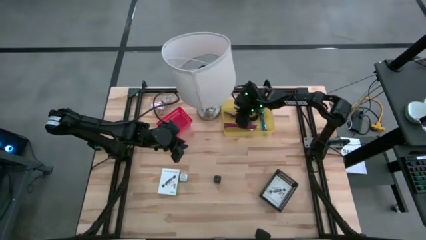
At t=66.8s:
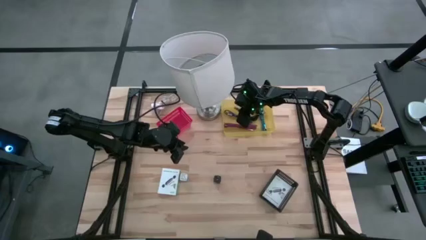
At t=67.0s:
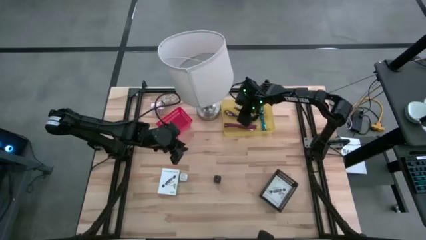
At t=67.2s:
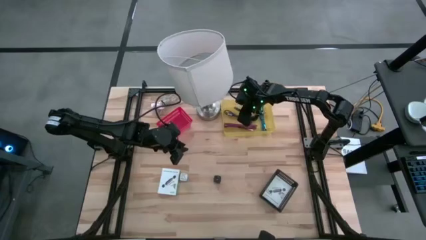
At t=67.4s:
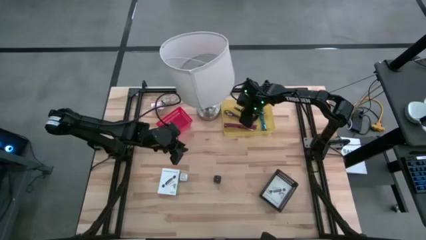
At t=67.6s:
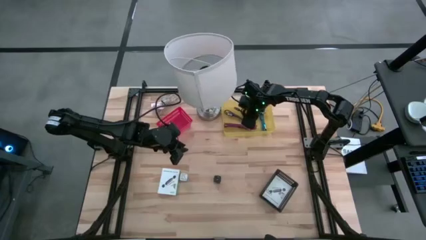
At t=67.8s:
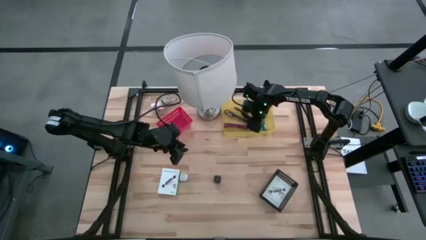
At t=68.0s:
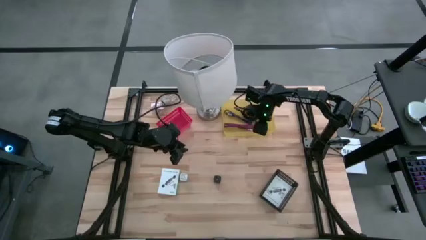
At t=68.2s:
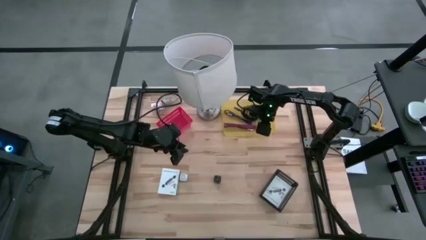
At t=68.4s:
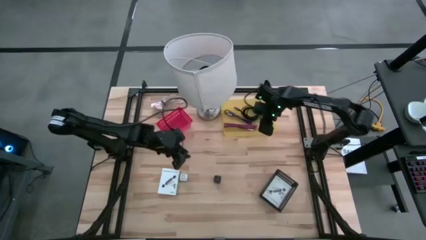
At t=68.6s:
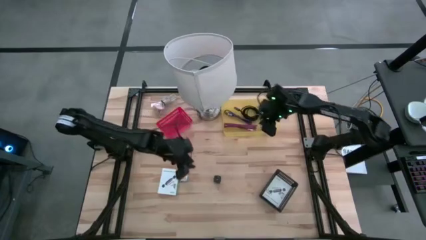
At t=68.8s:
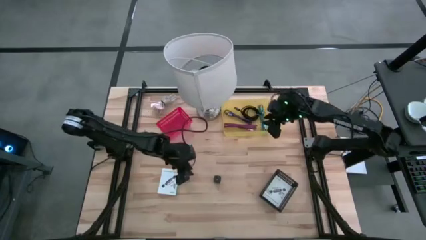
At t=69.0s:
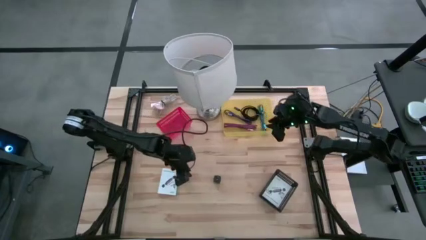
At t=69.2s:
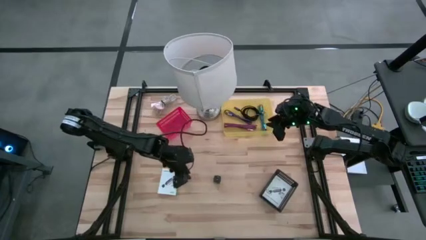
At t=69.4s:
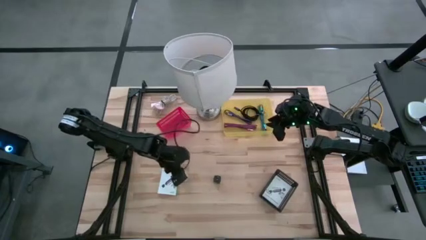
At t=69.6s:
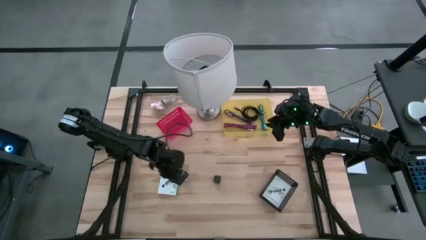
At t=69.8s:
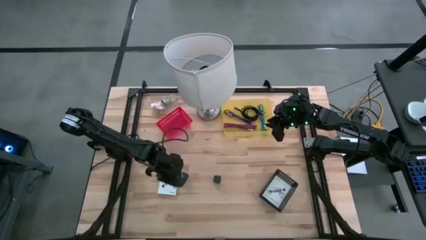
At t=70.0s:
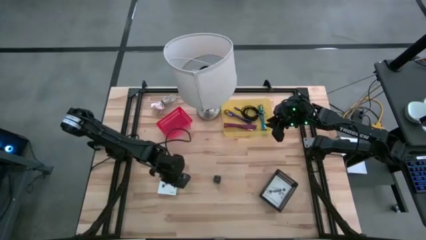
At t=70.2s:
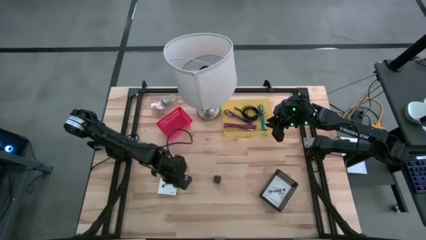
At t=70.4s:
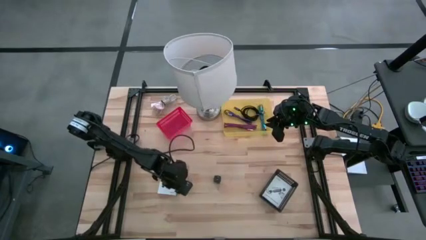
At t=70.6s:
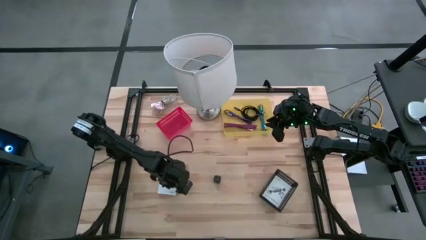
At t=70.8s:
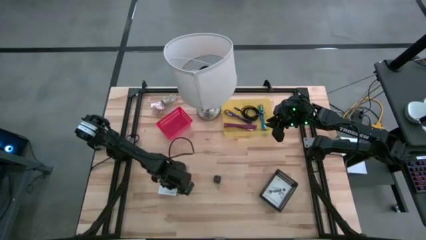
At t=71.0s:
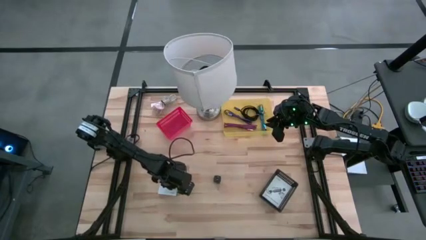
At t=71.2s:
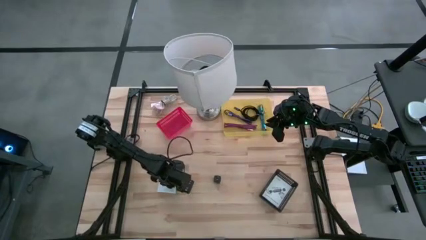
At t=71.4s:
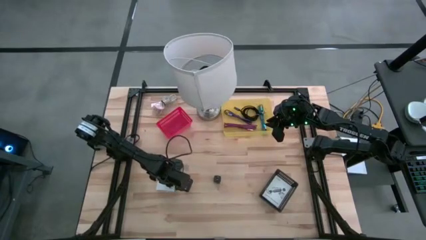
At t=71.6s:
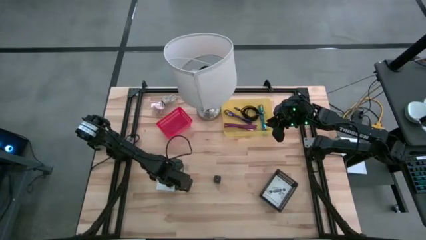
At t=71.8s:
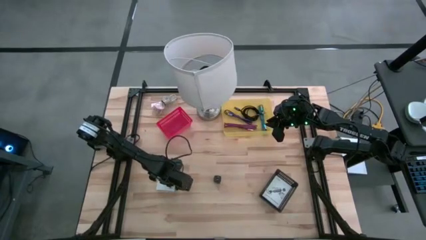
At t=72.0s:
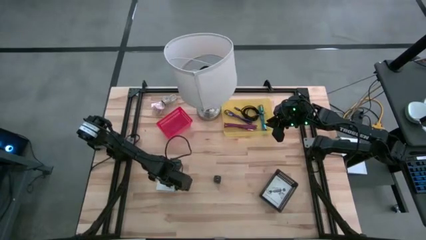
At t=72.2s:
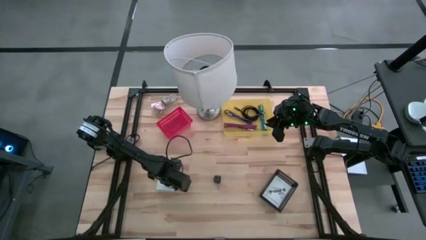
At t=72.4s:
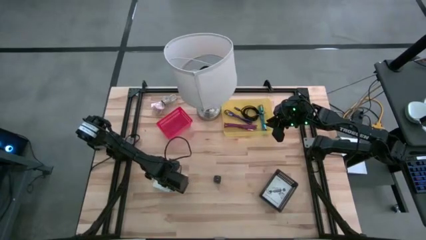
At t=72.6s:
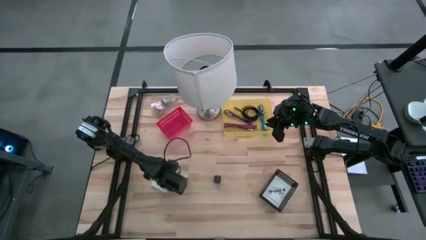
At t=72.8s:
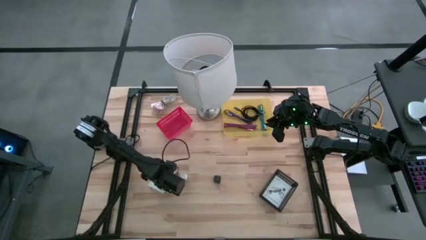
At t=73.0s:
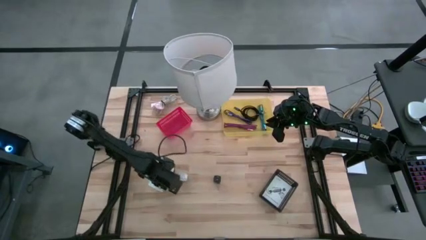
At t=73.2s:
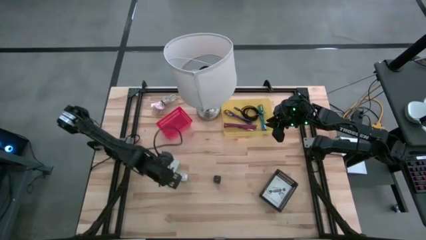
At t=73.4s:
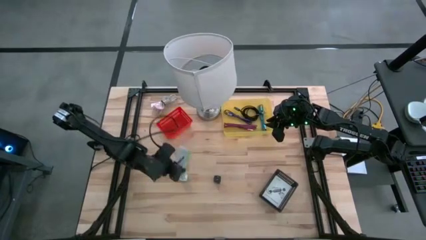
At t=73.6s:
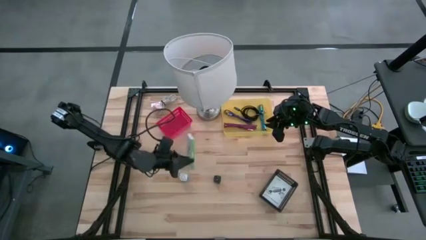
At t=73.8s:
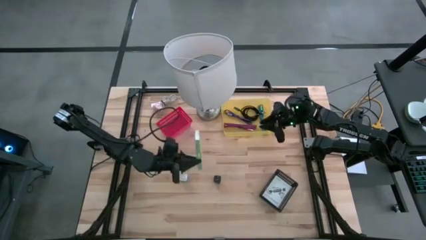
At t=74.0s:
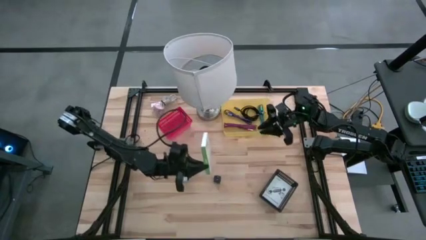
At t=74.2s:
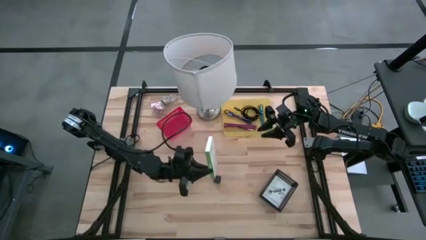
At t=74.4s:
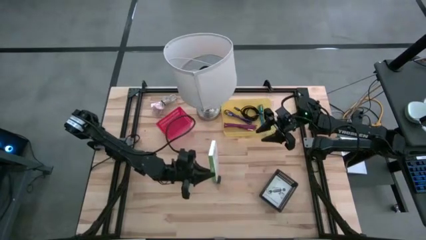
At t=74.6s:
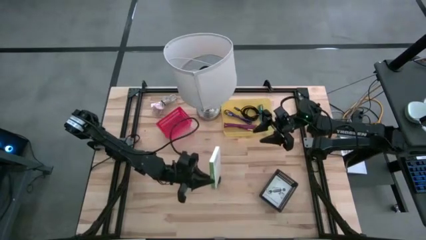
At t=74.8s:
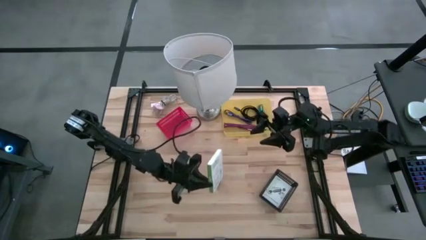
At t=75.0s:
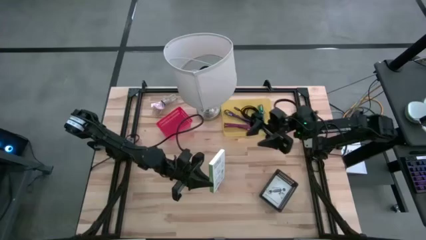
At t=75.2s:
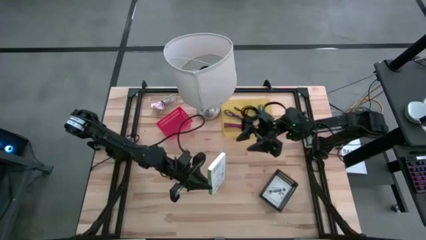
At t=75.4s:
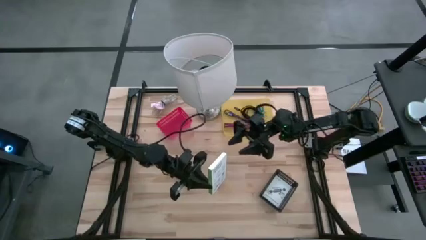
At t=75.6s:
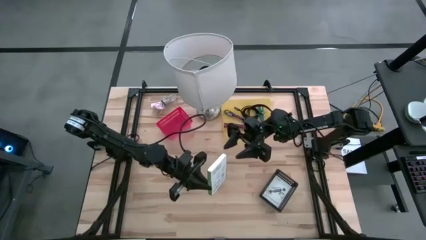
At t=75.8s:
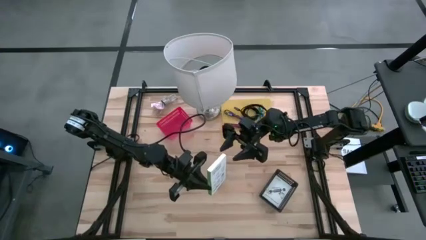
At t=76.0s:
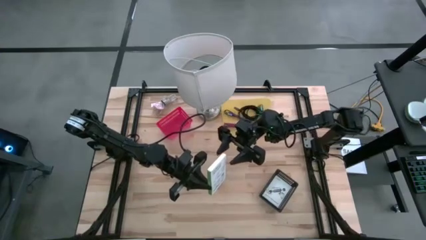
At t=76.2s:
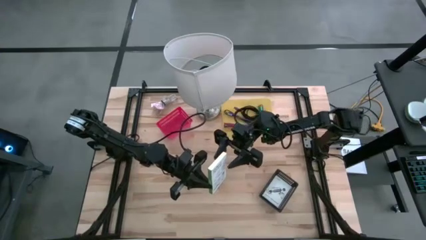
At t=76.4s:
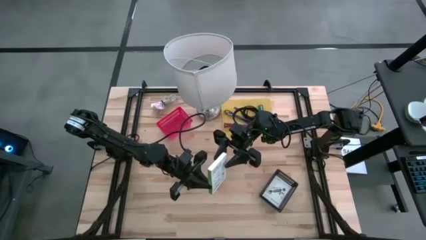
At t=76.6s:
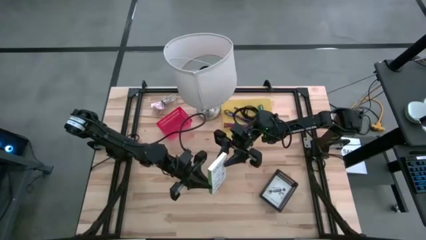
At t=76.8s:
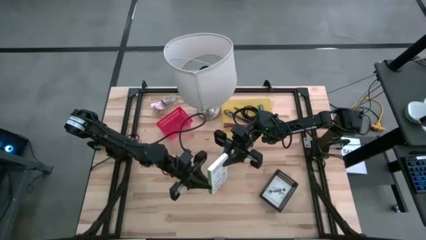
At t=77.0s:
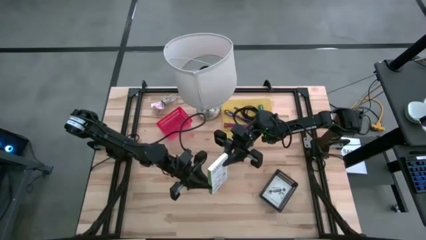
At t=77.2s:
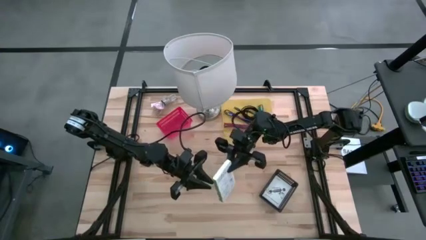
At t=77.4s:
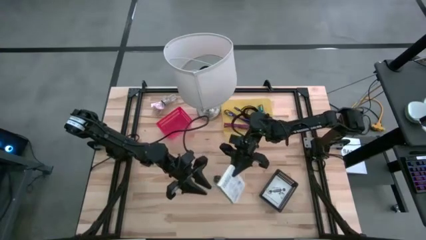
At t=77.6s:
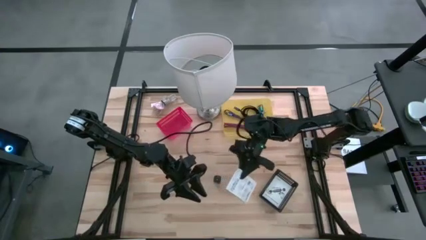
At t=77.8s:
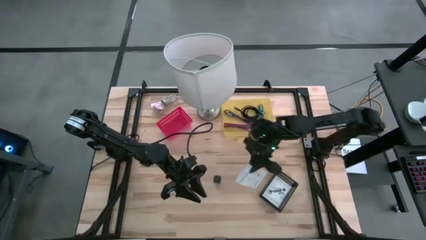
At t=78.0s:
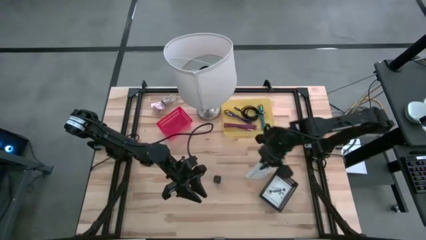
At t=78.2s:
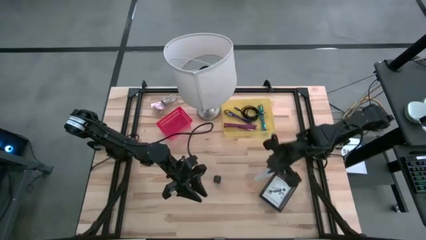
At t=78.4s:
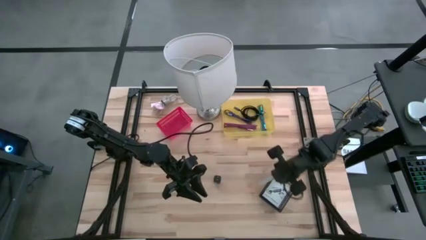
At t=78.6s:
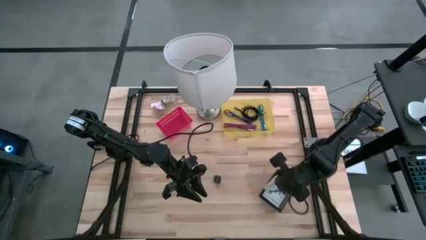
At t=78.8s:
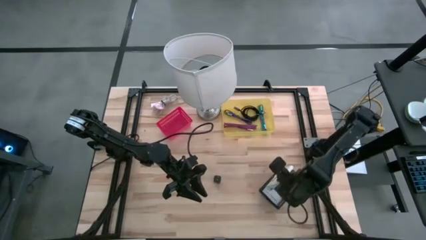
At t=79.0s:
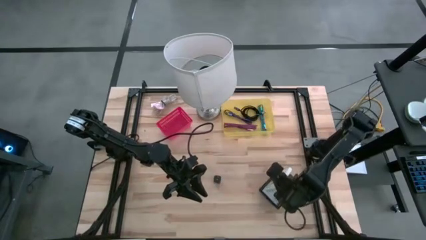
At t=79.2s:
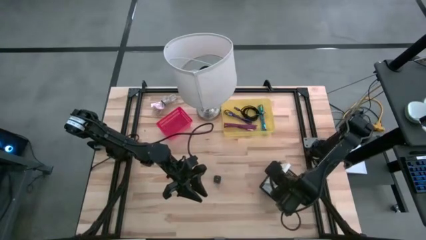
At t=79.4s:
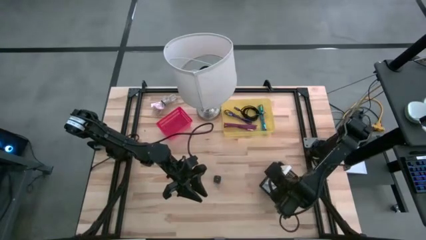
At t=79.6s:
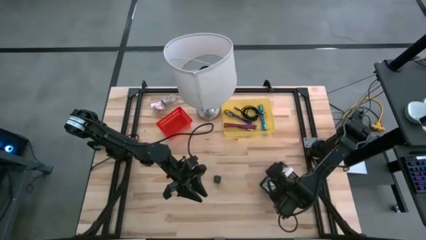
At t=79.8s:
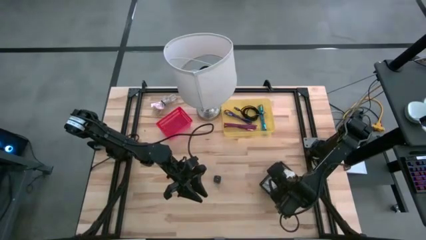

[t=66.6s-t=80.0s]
Task: Pick and place items into bin
Put the card reader box into the black bin

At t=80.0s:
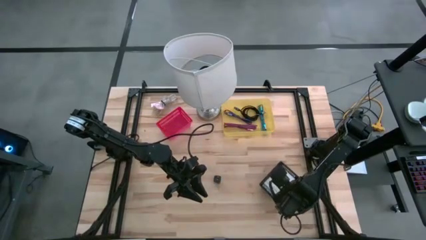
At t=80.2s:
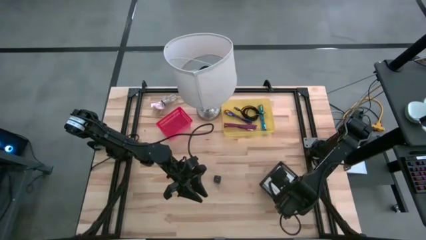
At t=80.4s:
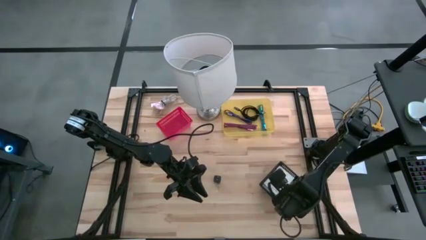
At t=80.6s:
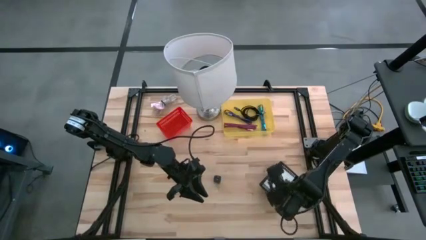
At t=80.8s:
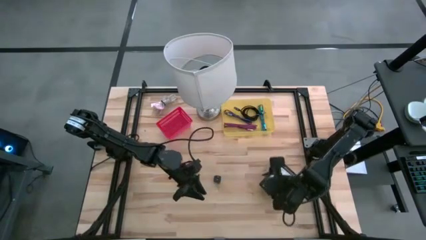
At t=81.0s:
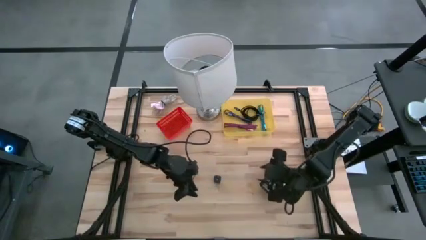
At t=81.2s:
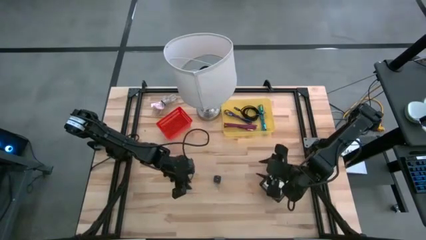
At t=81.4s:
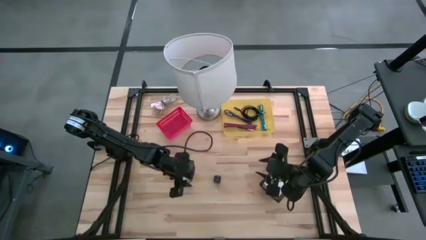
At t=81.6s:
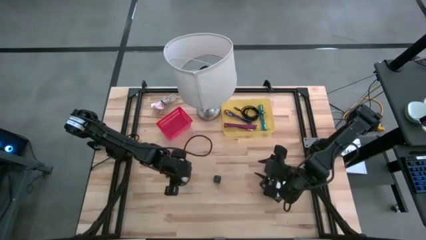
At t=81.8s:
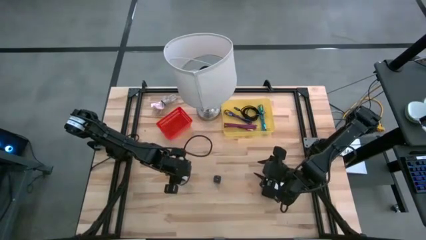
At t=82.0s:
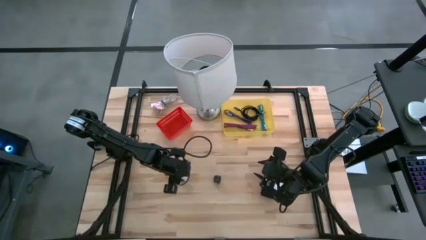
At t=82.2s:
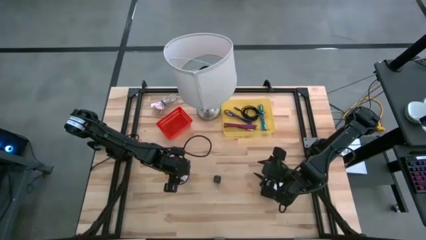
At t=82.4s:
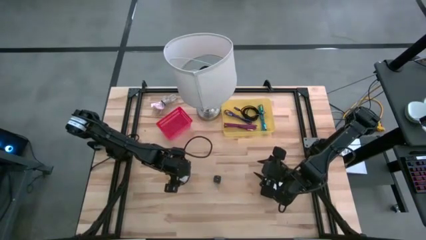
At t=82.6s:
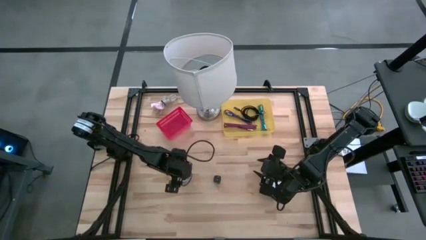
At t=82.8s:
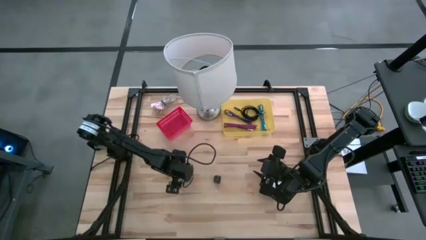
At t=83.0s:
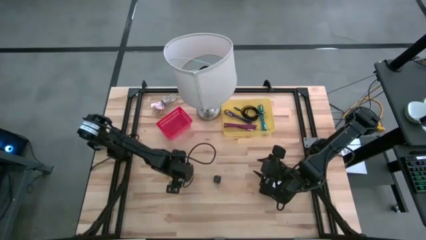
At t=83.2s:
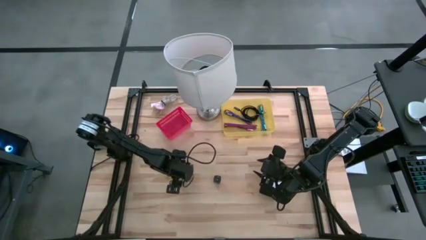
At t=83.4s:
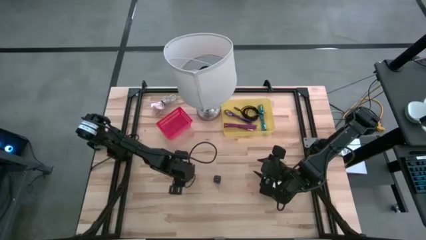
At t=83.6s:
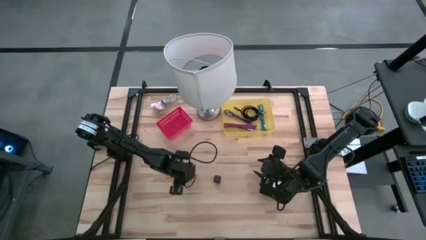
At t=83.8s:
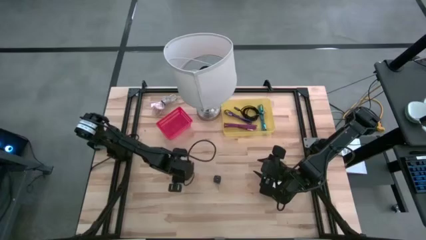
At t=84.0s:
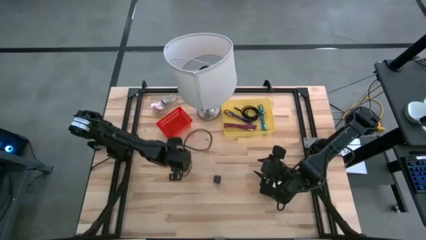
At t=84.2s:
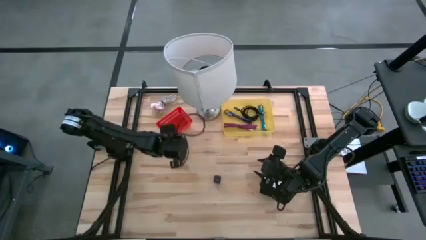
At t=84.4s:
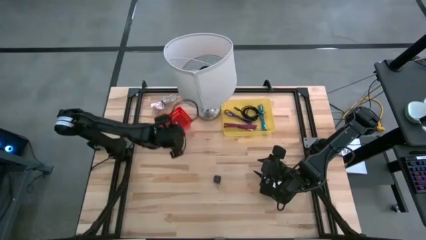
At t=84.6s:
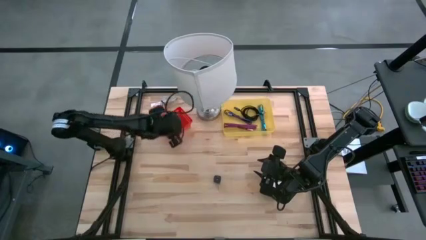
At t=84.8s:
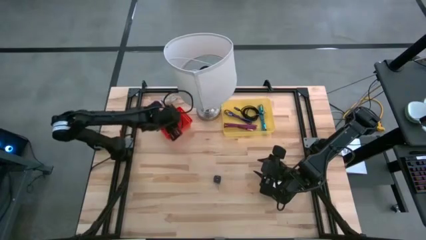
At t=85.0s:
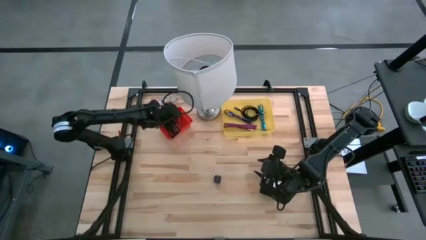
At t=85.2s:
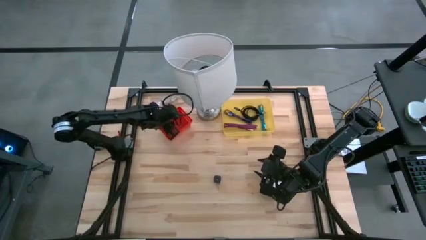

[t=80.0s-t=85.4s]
Put the blue charger adapter into the red bin
